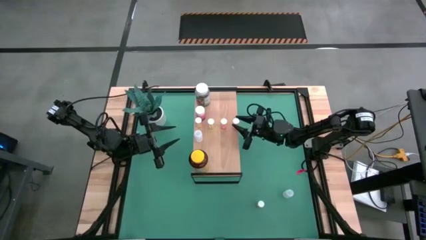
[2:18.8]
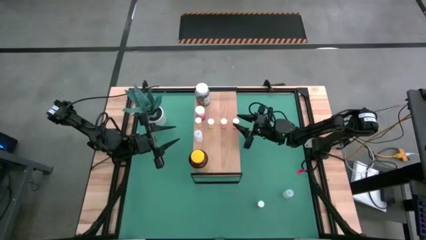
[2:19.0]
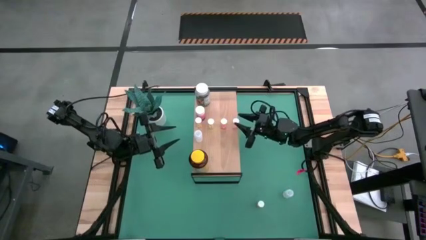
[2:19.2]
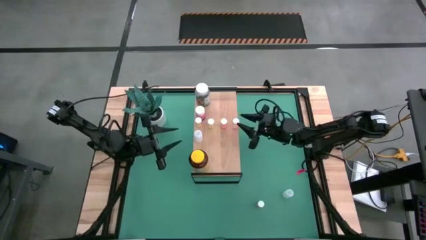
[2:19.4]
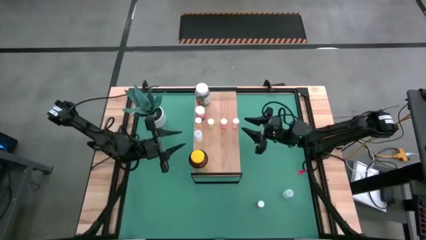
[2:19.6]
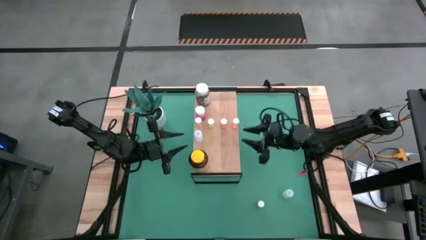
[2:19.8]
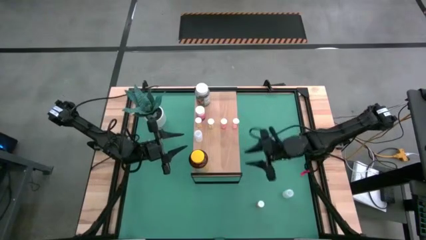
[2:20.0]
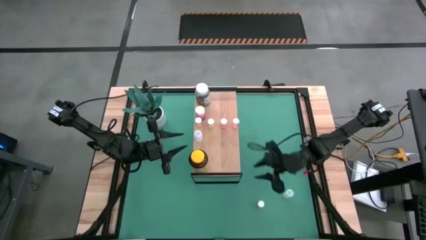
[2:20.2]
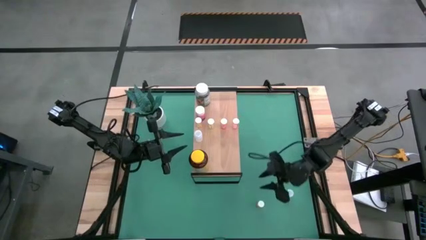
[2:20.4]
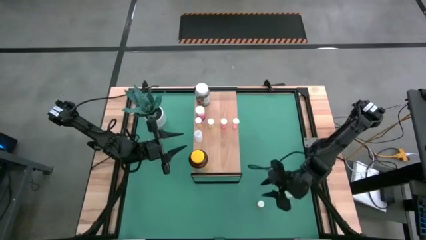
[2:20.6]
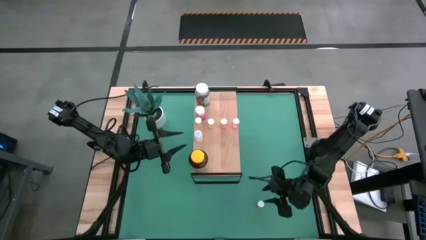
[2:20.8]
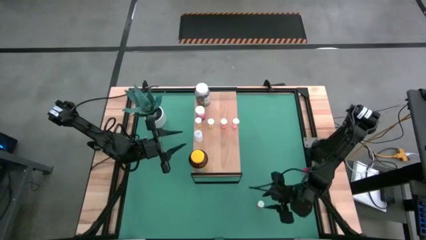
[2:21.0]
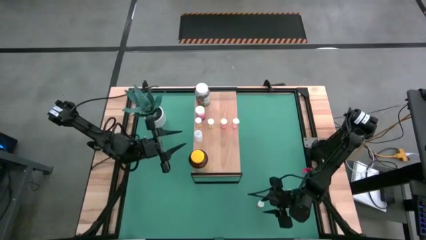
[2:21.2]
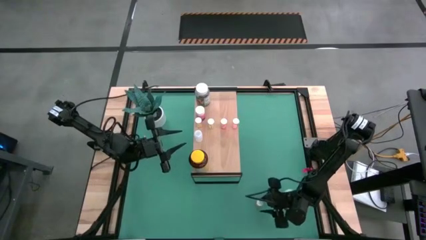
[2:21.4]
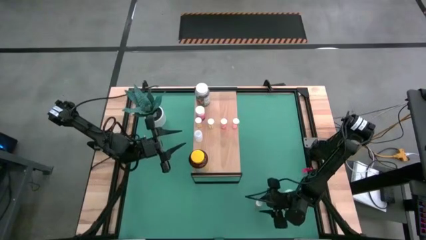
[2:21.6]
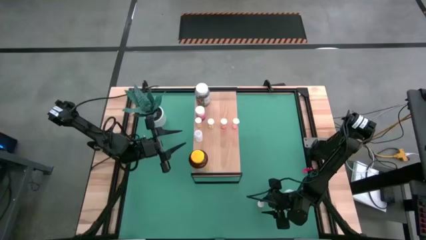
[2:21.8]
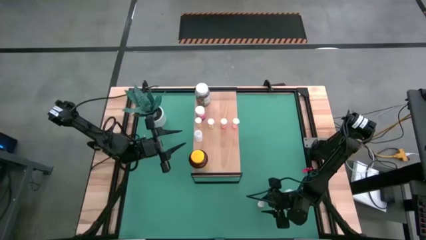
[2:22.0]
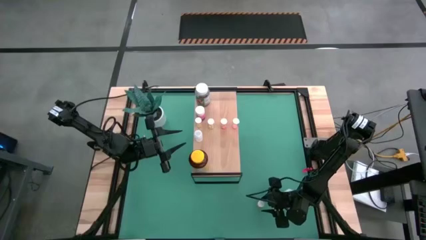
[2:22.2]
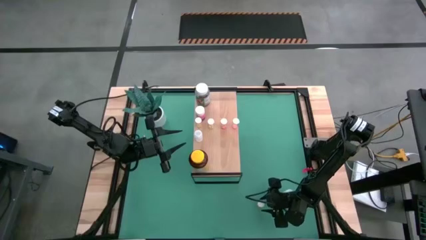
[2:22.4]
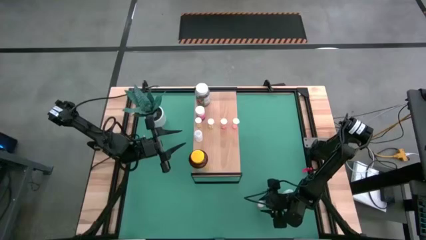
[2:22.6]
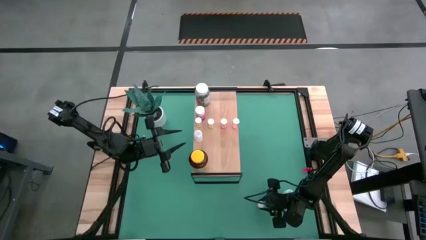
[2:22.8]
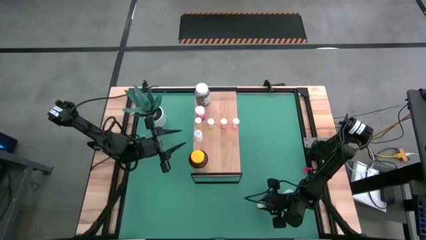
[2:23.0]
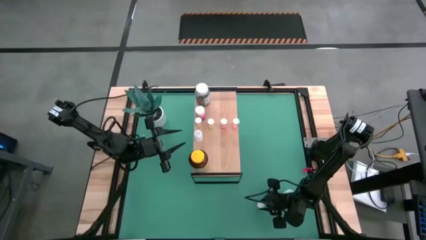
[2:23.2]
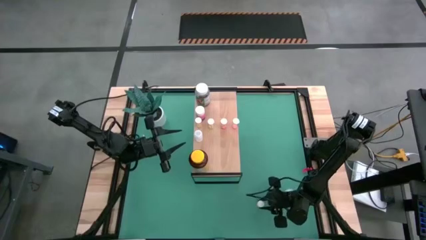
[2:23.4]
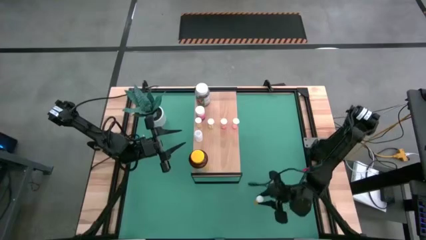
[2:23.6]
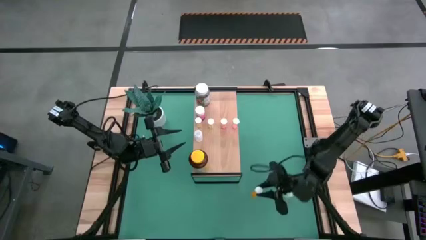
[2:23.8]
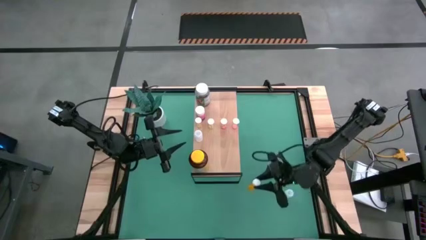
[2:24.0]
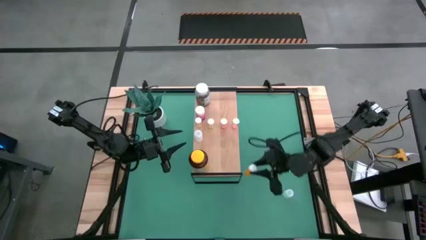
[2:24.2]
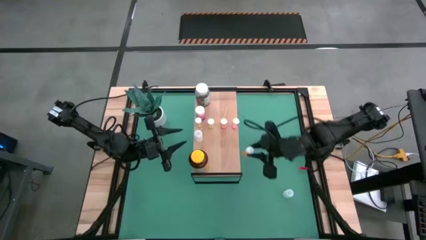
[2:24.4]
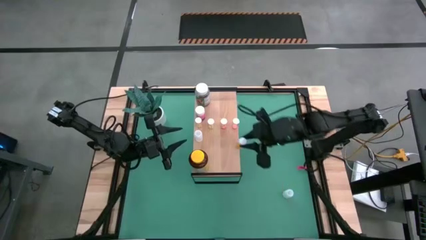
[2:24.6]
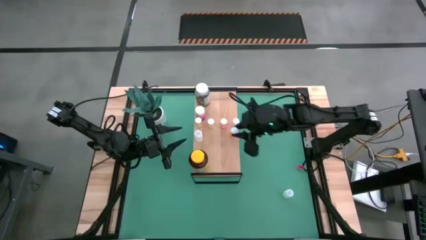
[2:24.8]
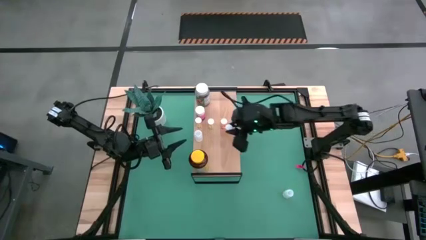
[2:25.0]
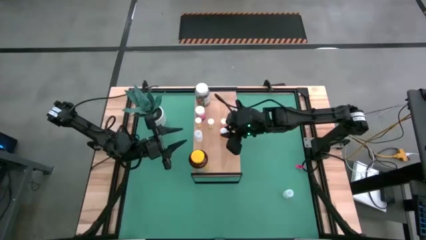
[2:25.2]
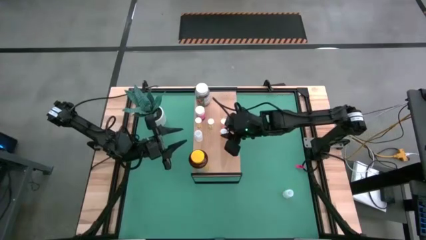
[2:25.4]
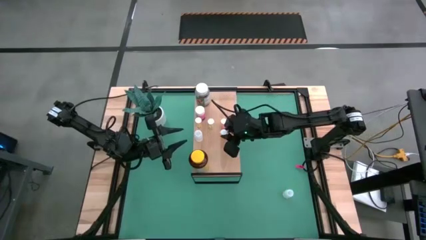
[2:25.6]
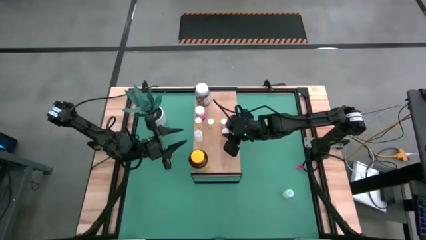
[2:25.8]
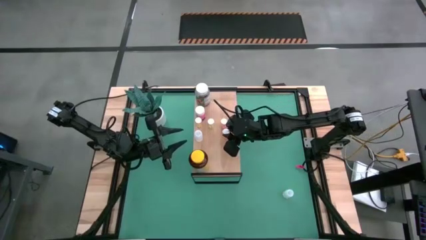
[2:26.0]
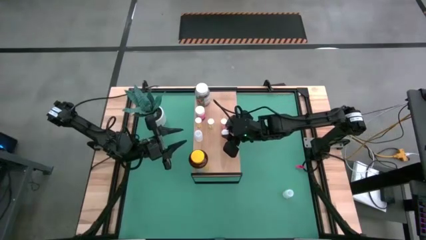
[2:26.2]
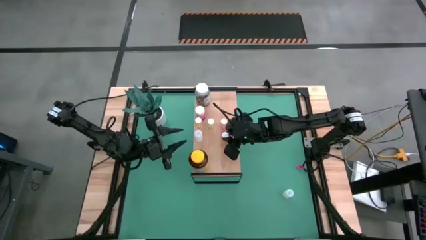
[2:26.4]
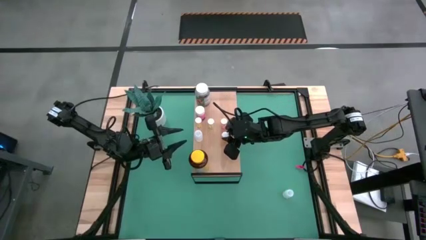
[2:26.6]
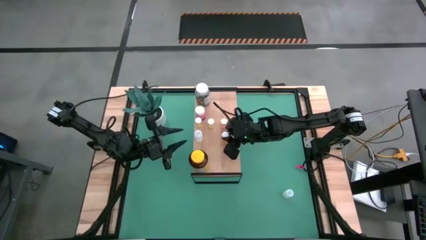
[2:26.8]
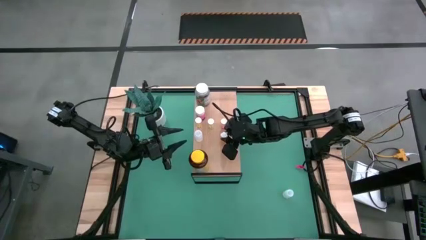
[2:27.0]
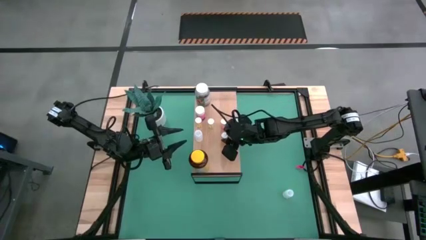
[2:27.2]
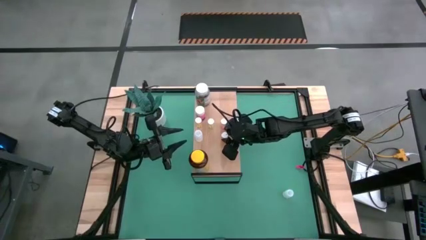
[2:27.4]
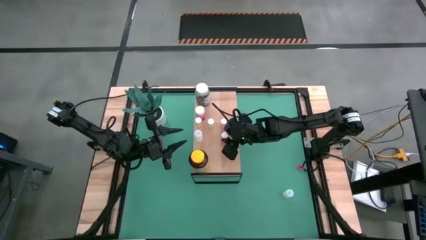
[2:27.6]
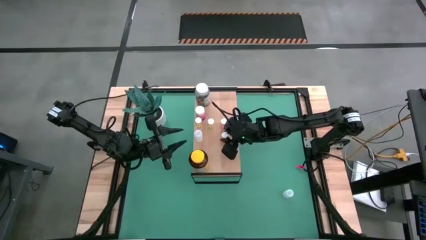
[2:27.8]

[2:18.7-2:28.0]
Task: Pick and place medicine bottles onto shelf by color
Put the orange pill bottle on the shelf

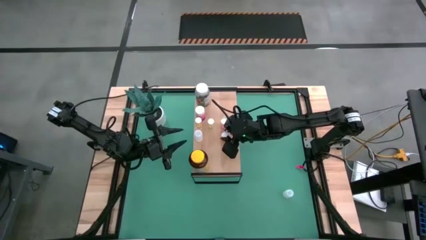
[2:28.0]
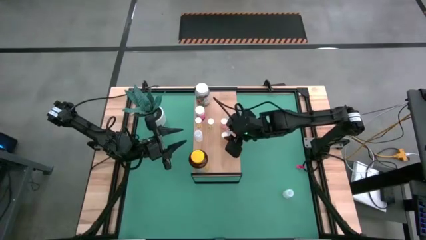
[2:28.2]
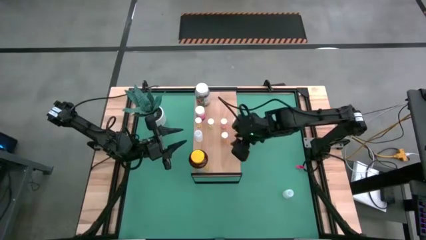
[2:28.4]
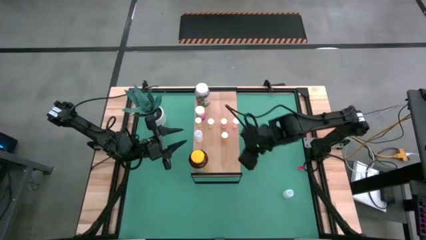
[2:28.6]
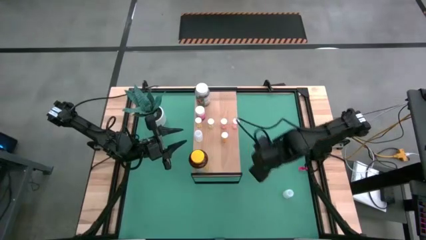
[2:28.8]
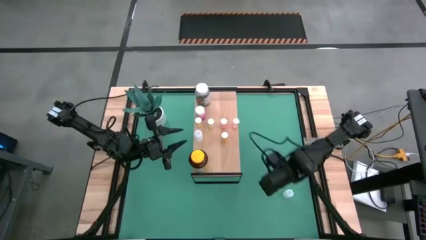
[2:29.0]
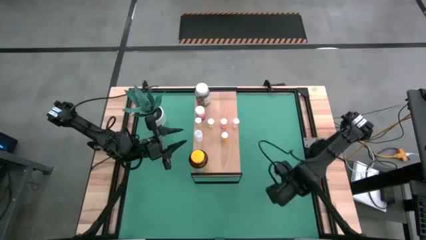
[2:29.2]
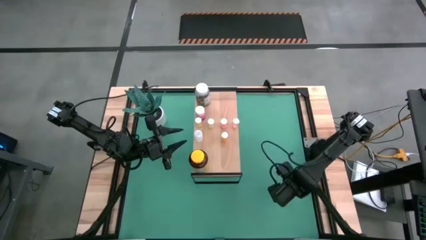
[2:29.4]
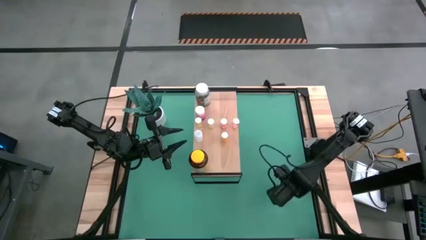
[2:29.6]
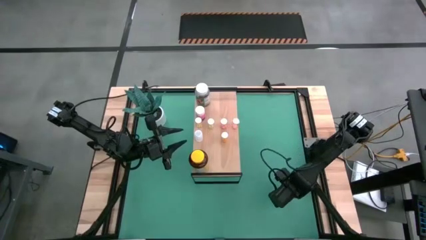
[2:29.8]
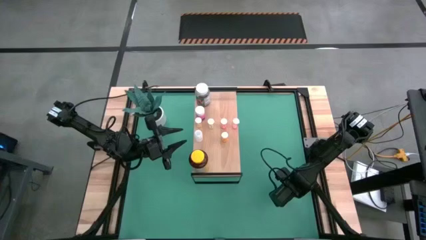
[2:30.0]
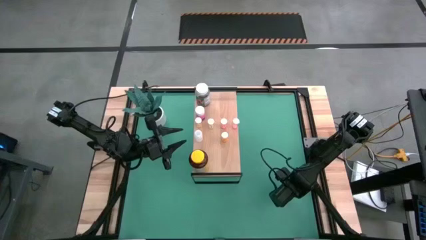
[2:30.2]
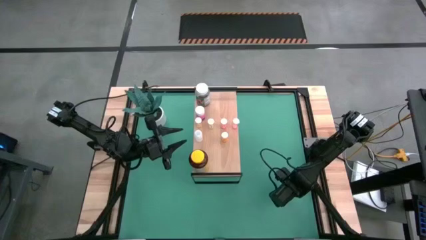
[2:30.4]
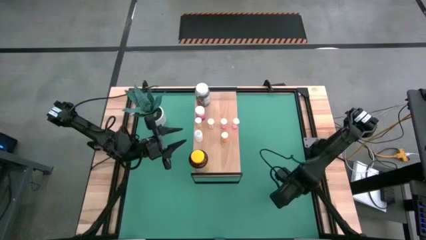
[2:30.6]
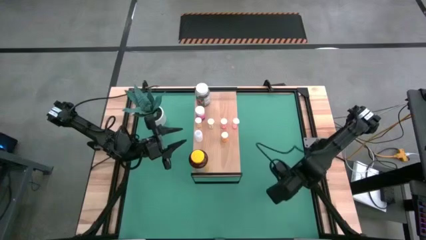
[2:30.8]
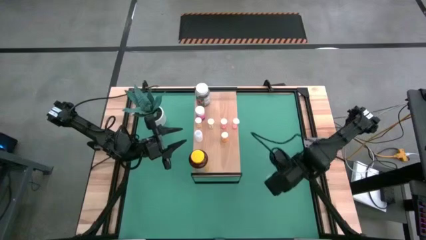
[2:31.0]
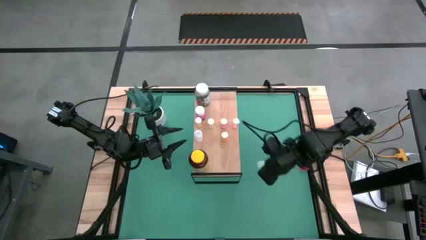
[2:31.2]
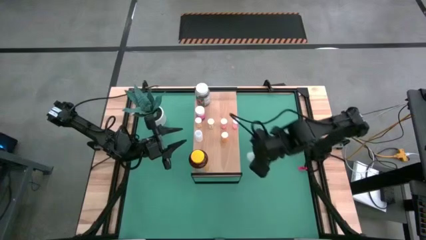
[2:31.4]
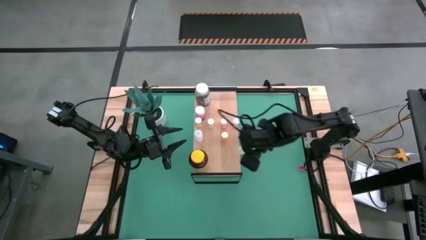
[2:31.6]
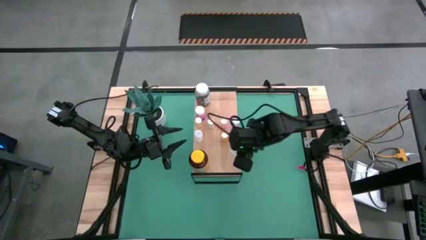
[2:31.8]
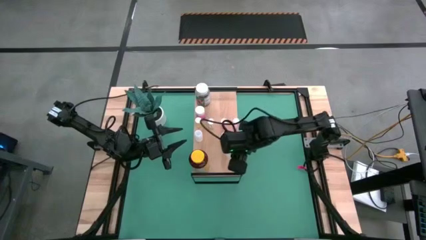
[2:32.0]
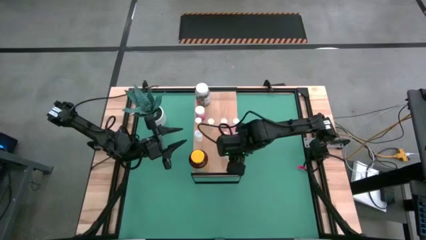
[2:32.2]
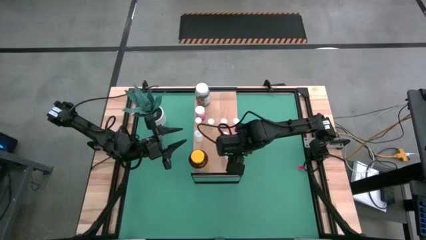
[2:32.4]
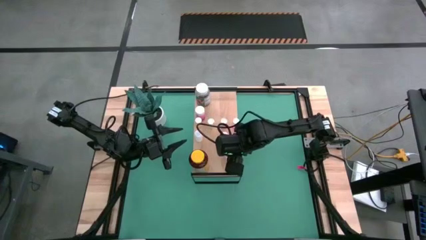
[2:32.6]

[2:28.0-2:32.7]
Put the white pill bottle on the shelf

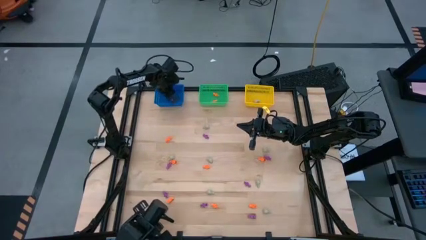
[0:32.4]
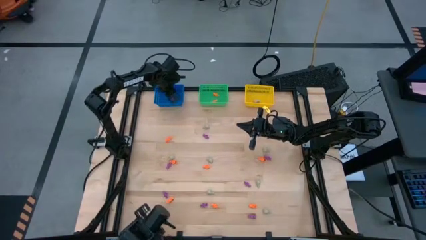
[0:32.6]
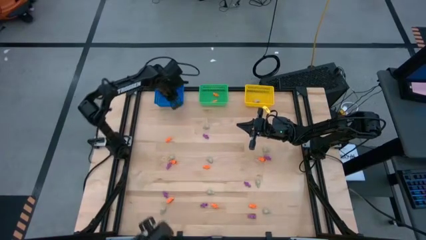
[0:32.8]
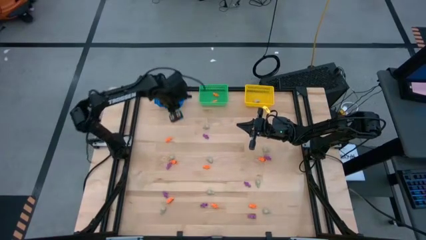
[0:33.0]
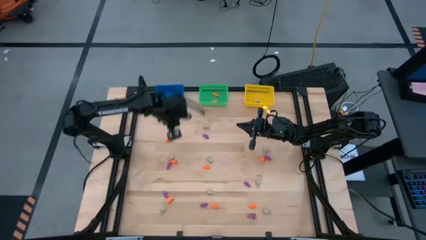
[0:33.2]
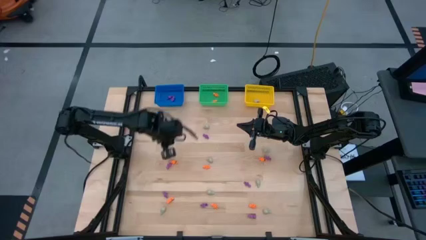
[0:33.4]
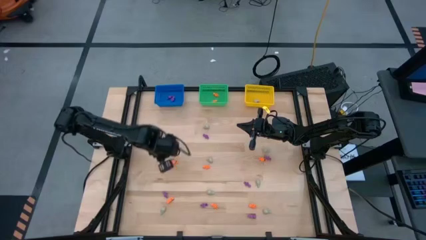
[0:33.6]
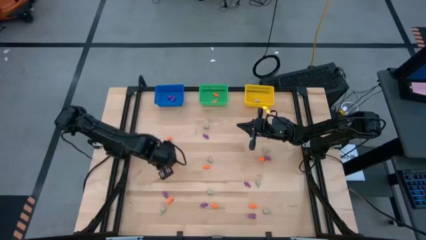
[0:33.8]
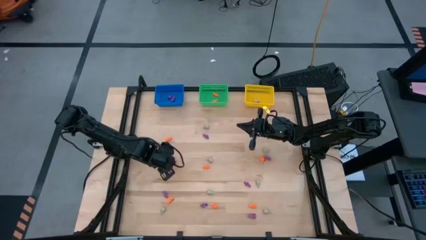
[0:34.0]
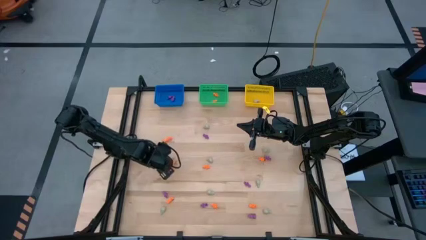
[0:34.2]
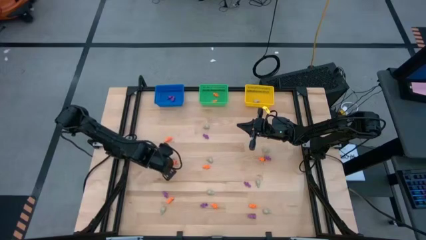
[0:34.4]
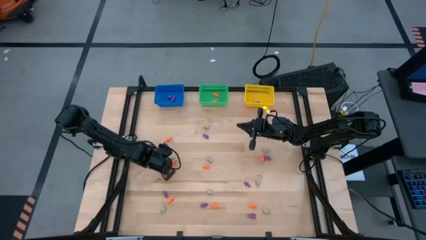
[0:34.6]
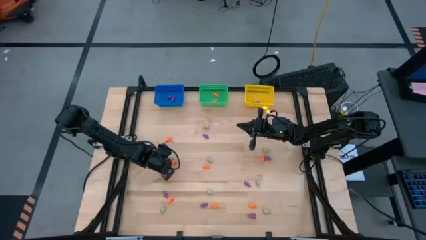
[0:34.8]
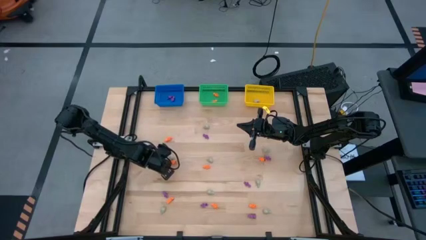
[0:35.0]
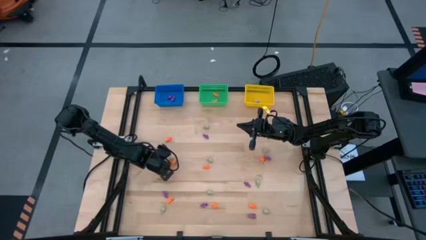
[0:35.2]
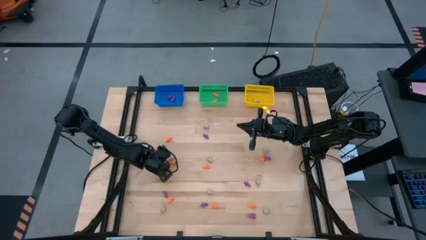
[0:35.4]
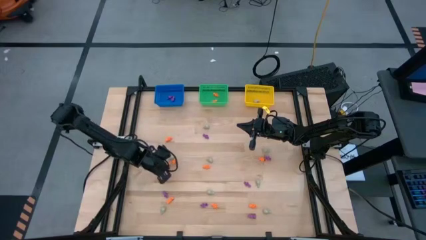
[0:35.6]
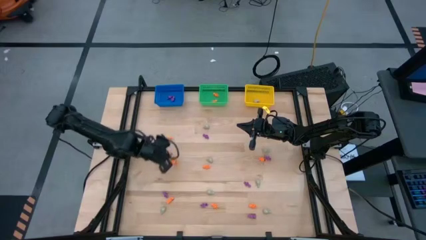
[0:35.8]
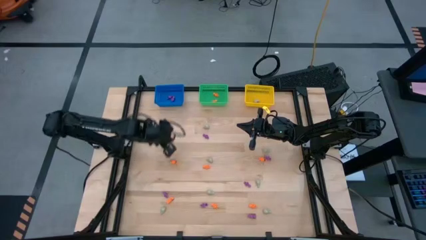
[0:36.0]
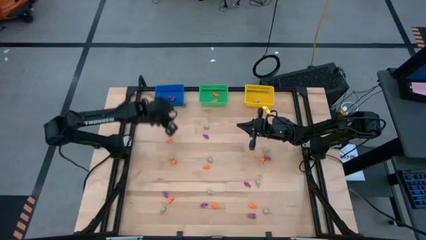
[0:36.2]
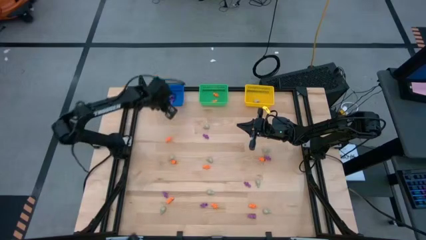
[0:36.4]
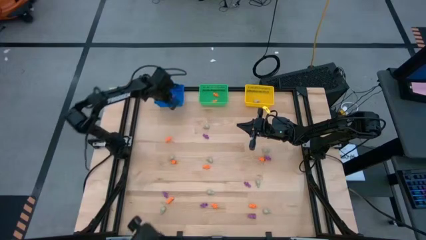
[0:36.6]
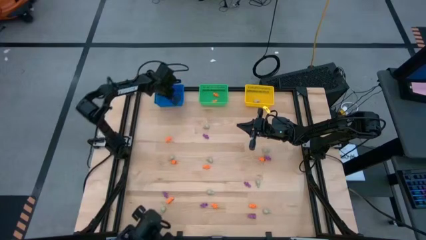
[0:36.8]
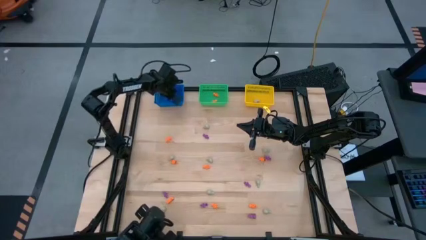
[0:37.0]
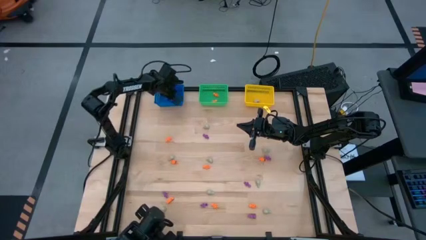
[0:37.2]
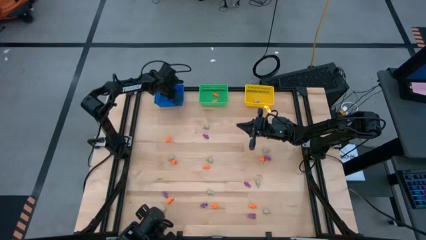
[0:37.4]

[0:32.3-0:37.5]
Task: Sort Halloween decoration
Put the purple skeleton toy into the blue basket
